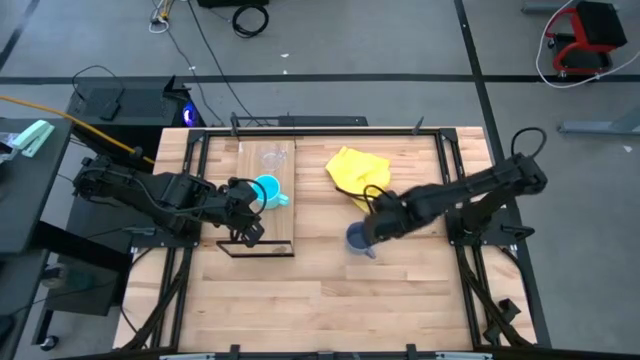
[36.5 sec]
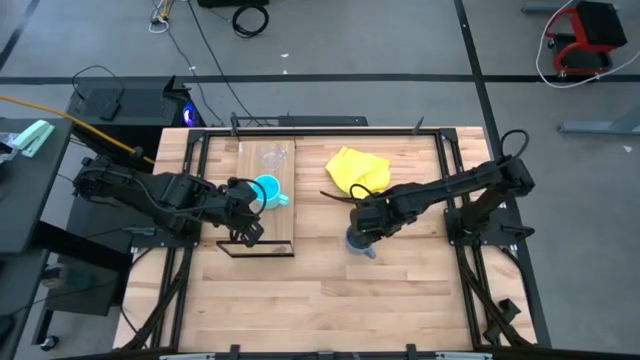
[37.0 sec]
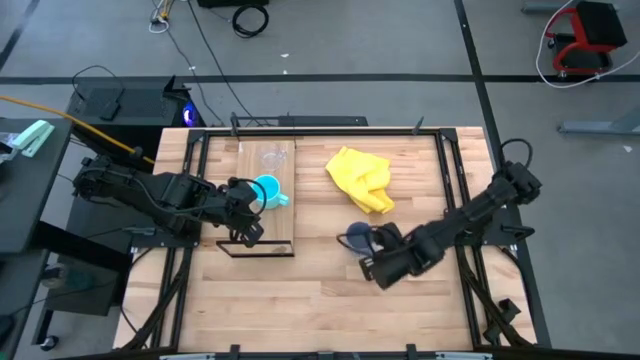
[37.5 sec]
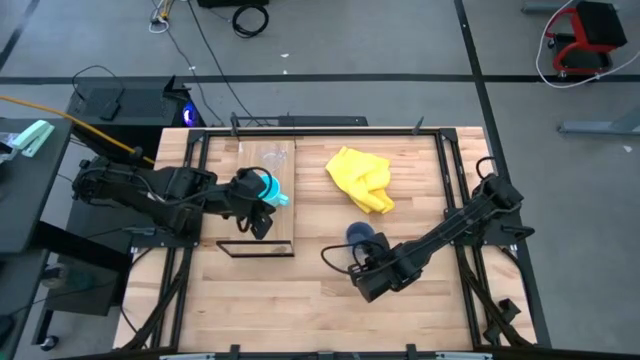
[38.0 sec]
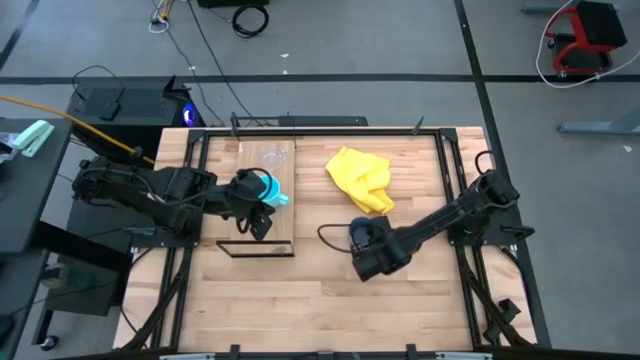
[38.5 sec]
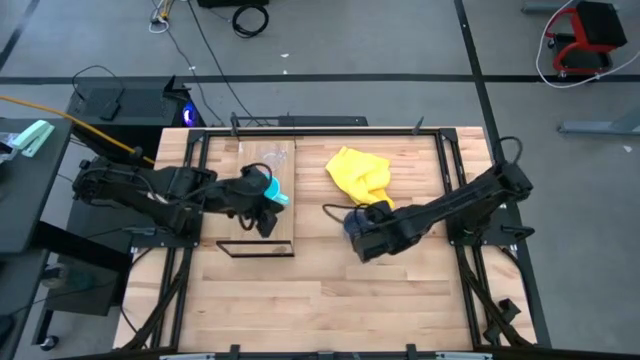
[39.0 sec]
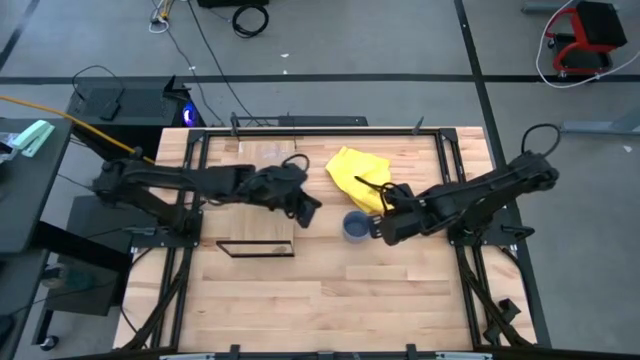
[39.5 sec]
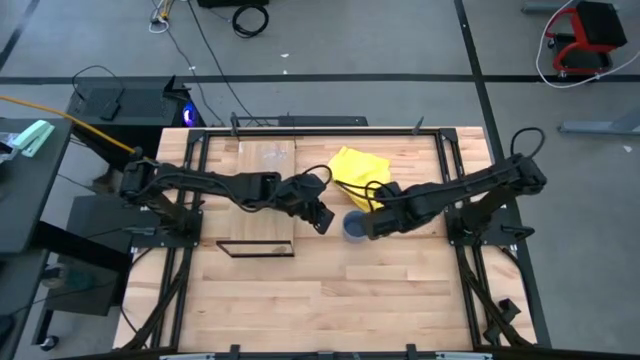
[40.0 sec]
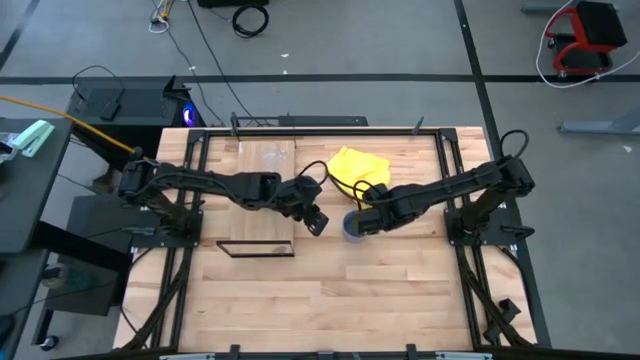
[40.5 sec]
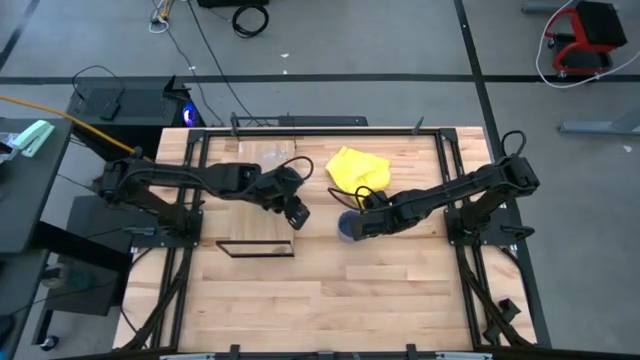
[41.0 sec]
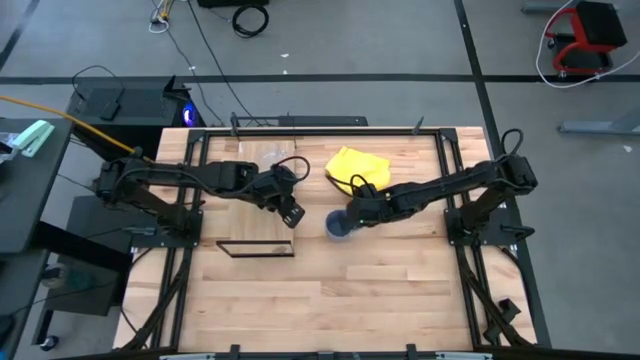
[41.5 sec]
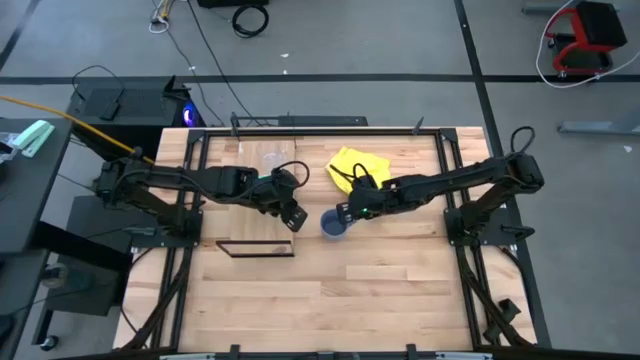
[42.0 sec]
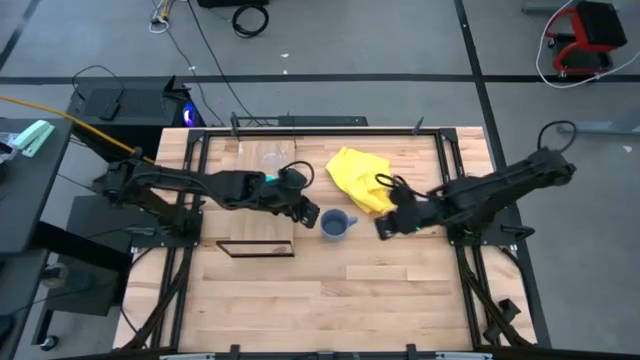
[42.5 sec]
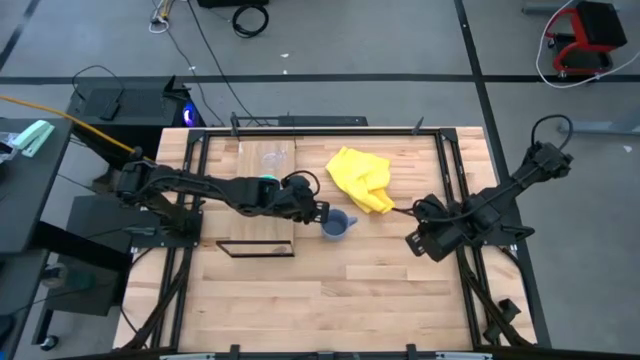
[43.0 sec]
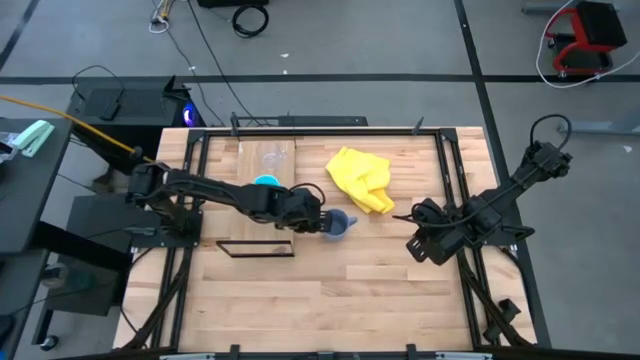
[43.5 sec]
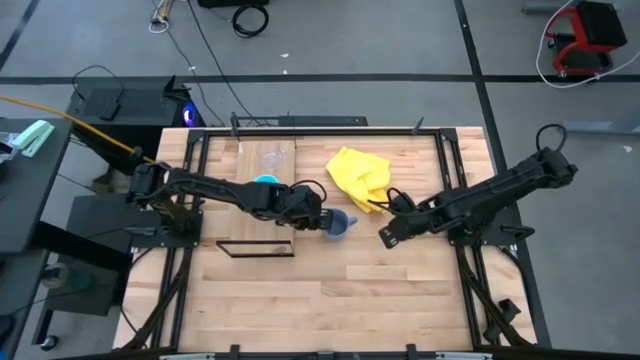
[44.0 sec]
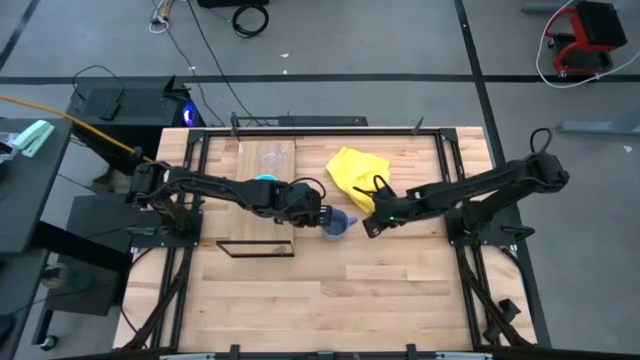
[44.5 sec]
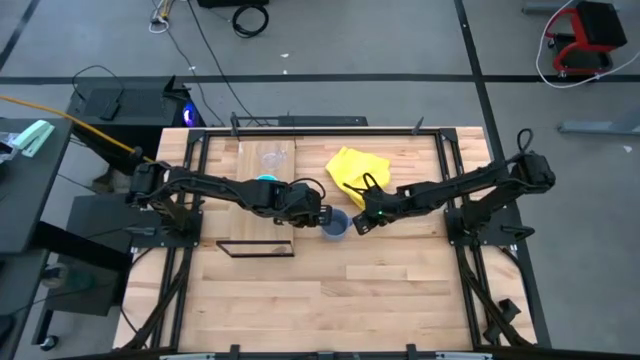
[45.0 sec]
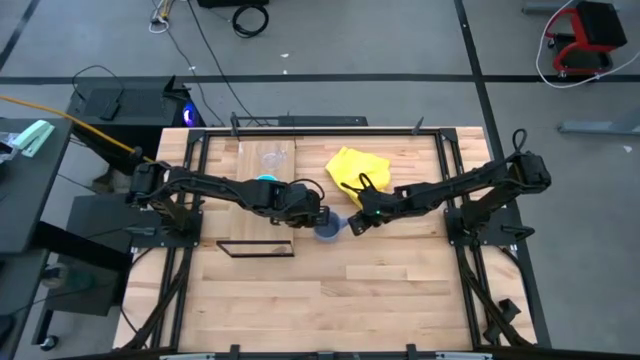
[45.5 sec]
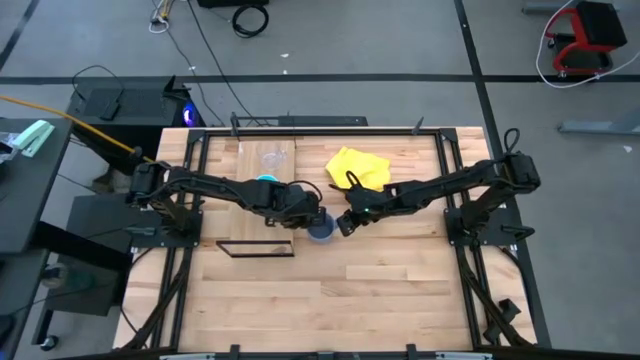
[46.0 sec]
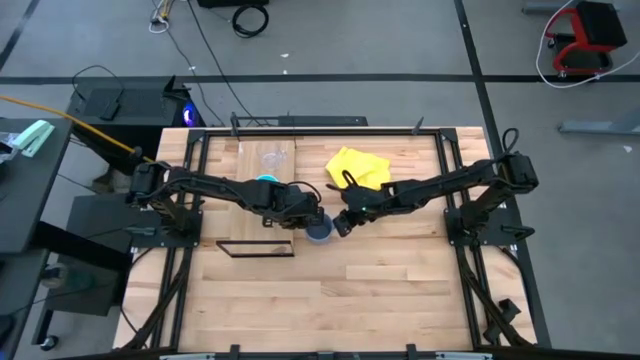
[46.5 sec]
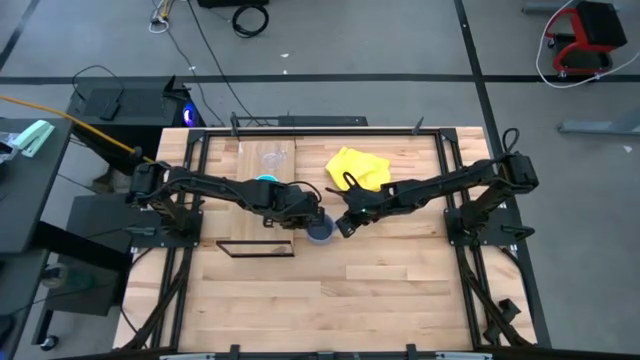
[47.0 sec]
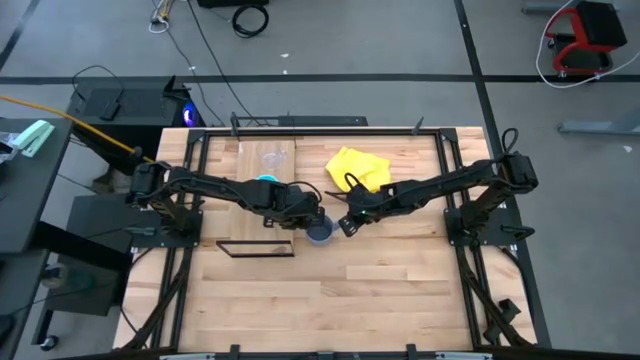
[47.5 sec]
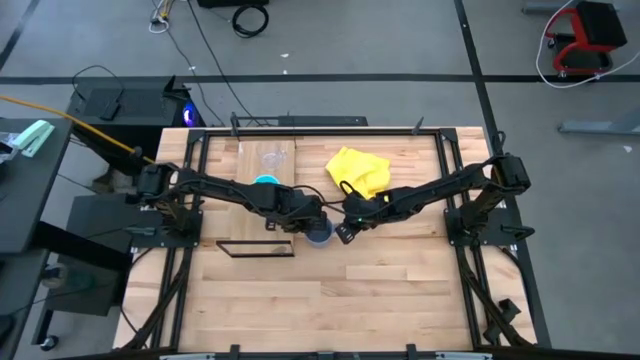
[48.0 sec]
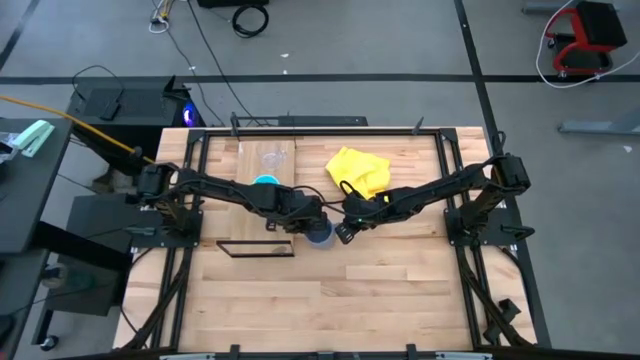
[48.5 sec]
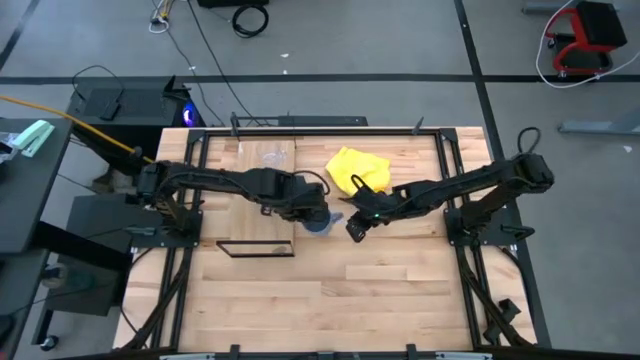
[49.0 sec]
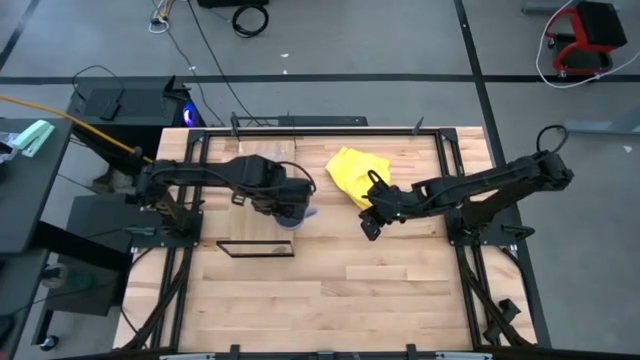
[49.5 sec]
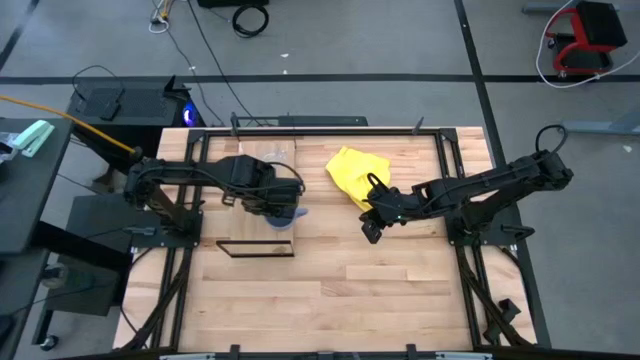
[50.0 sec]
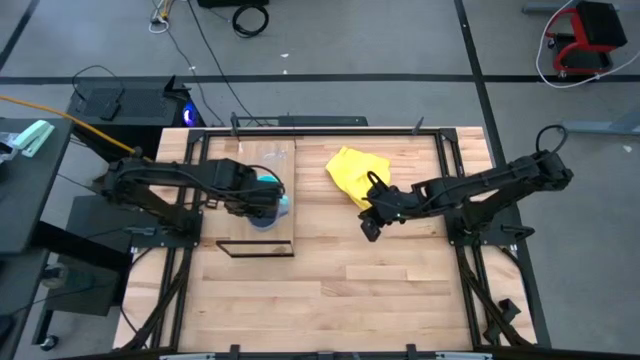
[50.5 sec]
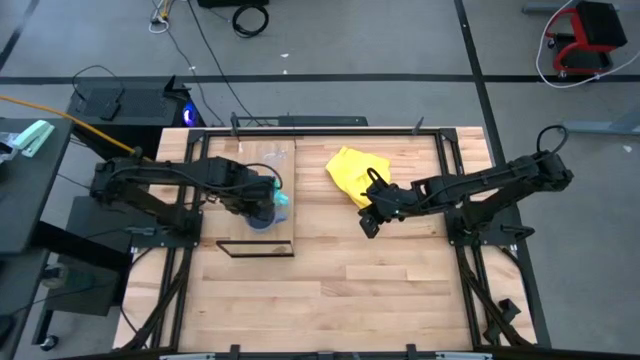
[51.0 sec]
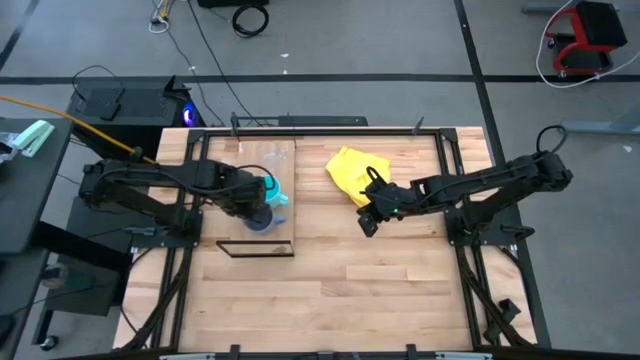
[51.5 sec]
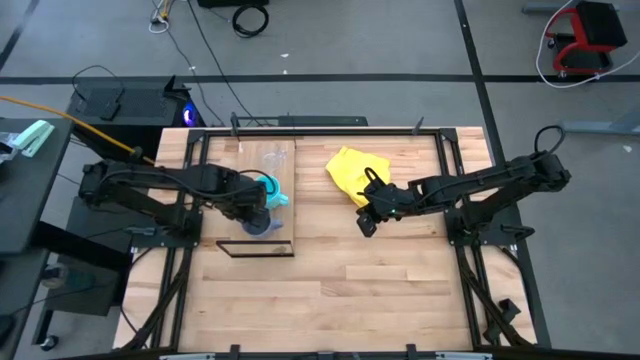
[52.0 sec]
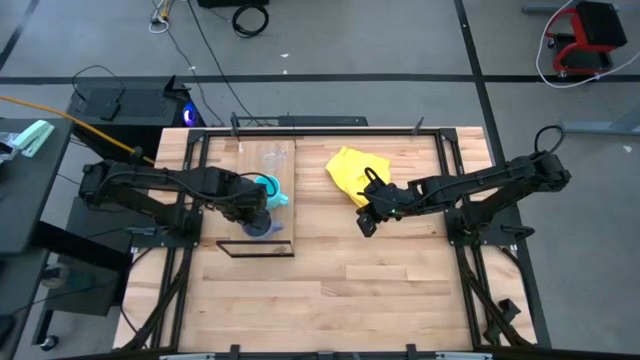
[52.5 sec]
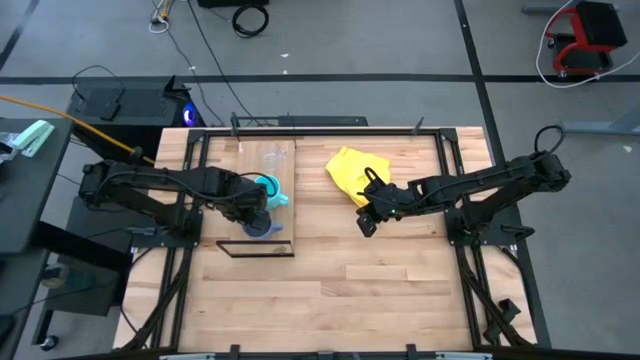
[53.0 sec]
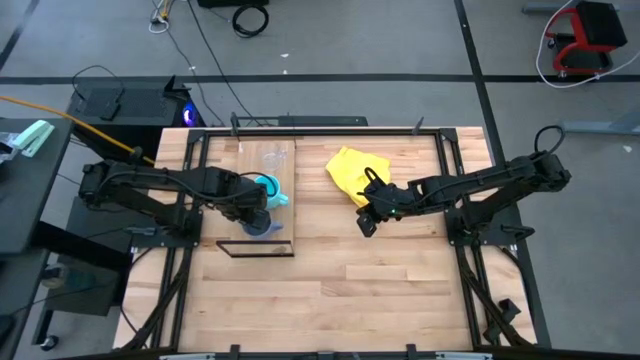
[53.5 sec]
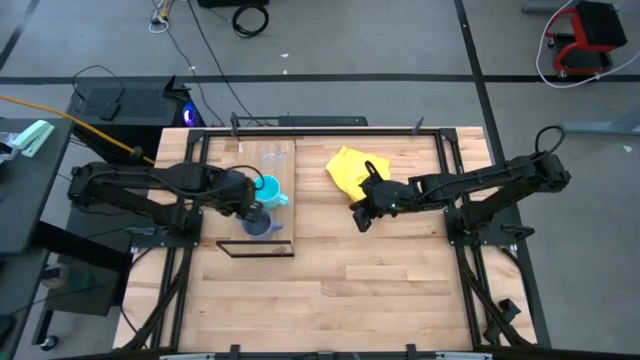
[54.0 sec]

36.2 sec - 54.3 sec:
Task: Stack small to large cups/mugs on shelf
Put the blue mug on the shelf

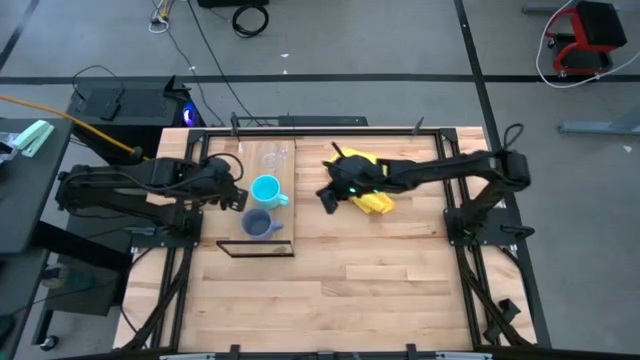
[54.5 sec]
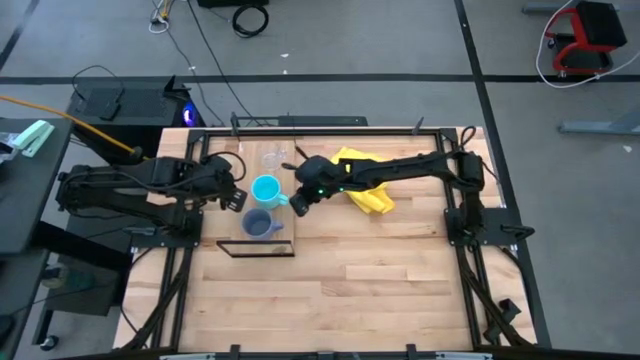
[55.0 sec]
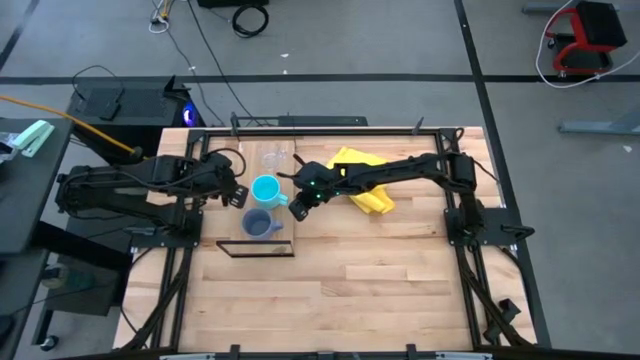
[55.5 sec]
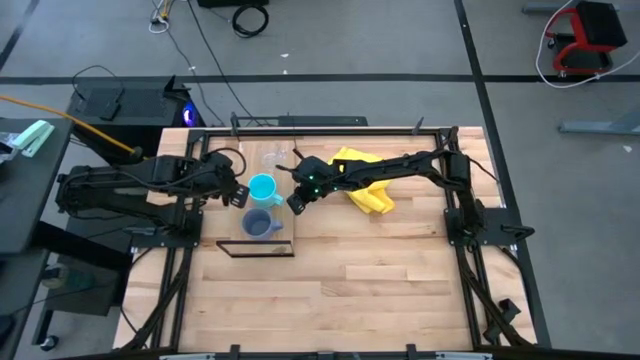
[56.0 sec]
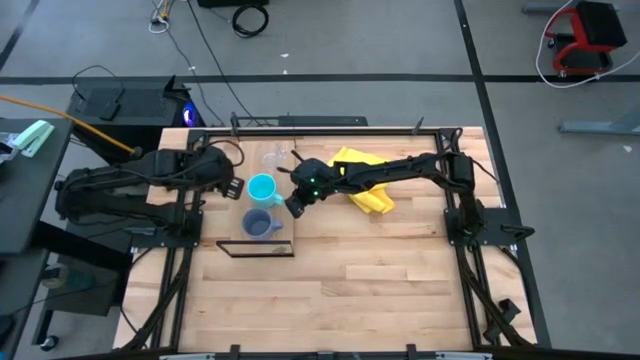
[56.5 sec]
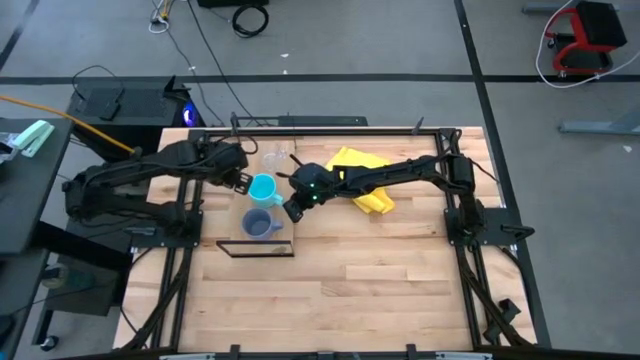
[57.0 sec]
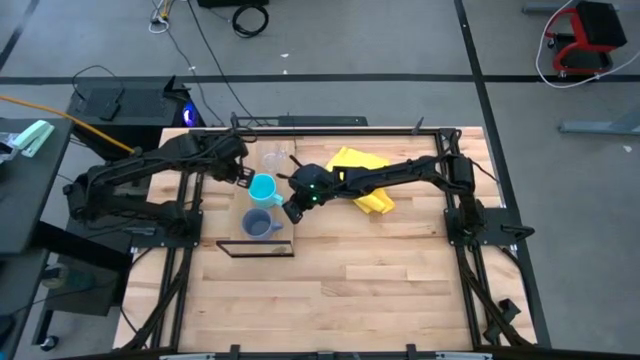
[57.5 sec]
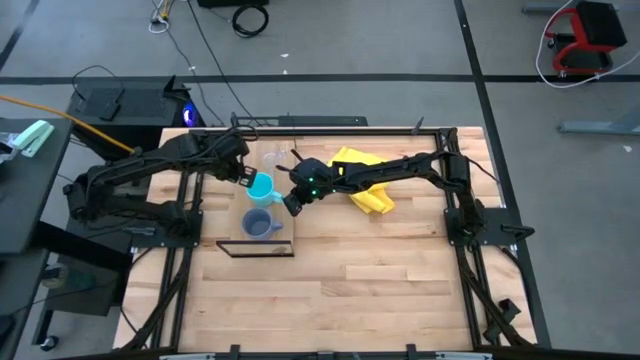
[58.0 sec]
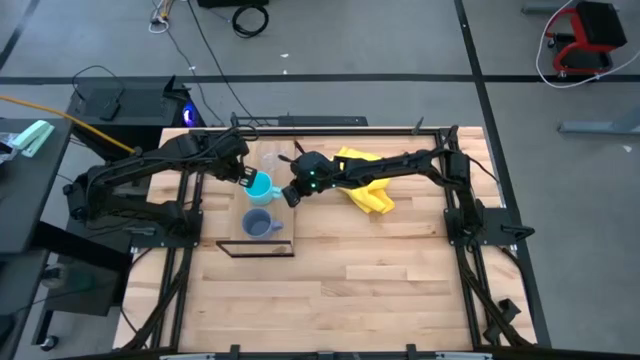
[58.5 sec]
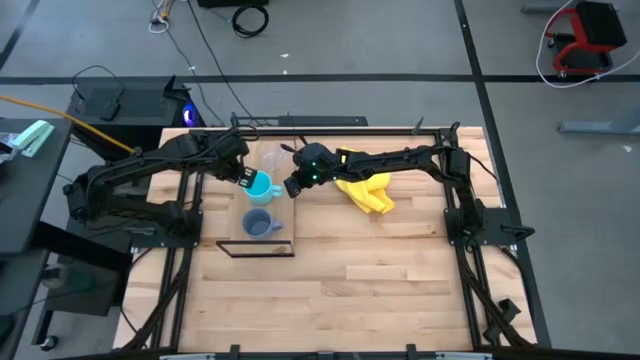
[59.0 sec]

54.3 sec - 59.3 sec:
Adjust the light blue mug on the shelf
